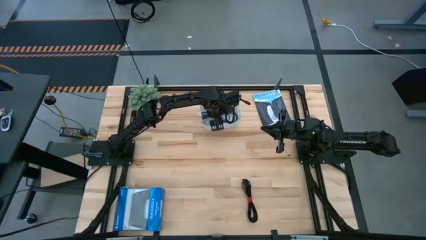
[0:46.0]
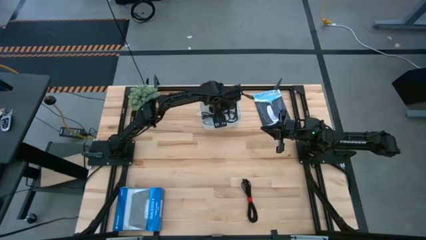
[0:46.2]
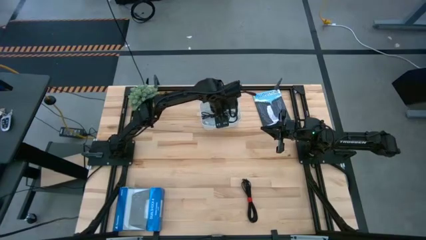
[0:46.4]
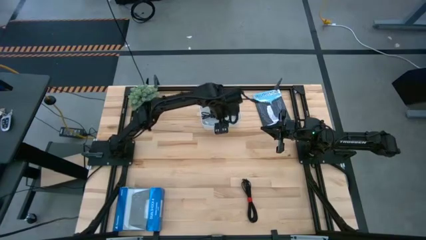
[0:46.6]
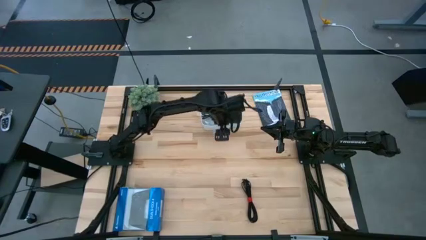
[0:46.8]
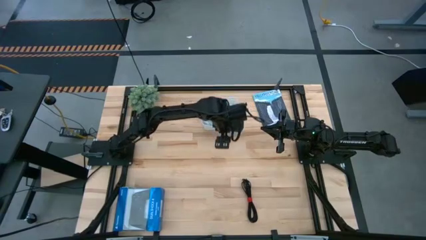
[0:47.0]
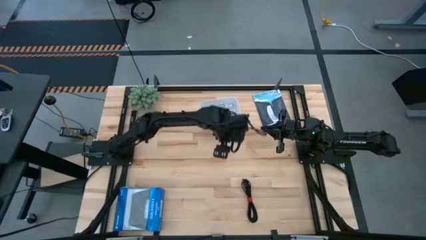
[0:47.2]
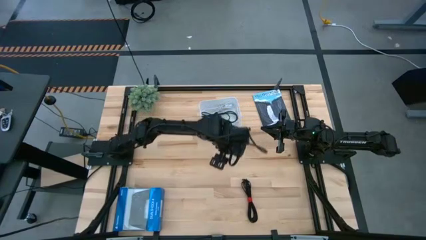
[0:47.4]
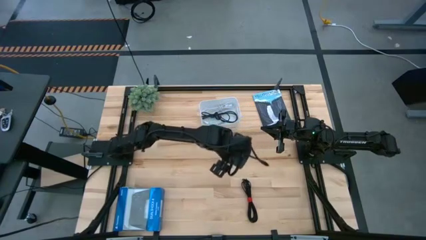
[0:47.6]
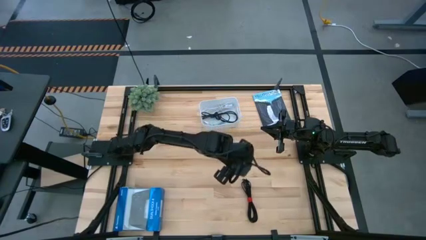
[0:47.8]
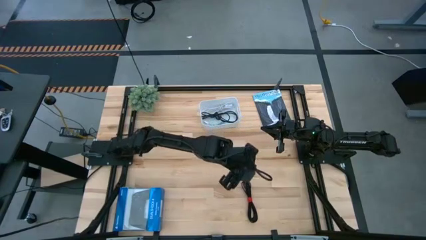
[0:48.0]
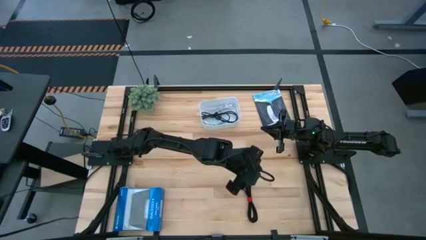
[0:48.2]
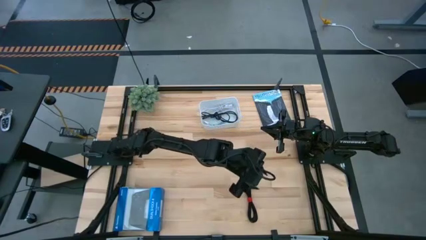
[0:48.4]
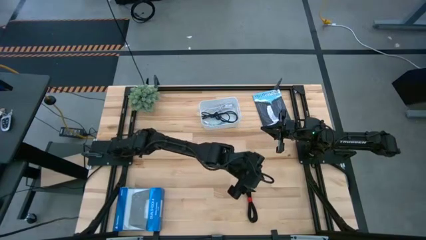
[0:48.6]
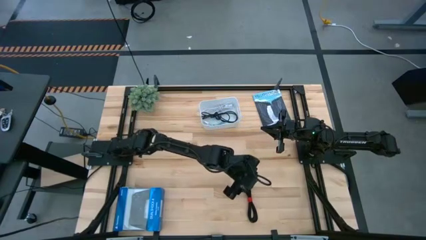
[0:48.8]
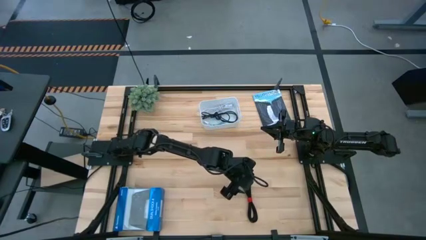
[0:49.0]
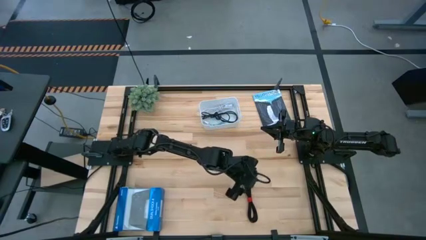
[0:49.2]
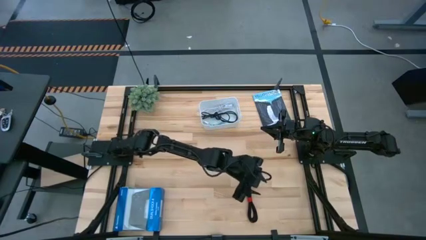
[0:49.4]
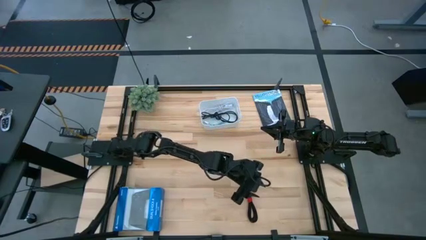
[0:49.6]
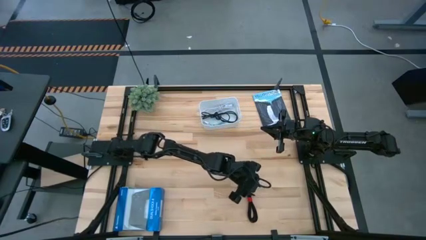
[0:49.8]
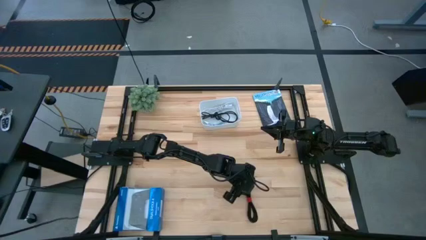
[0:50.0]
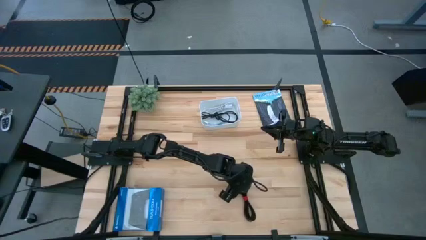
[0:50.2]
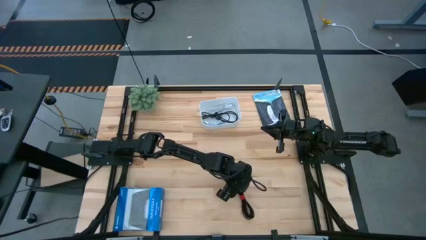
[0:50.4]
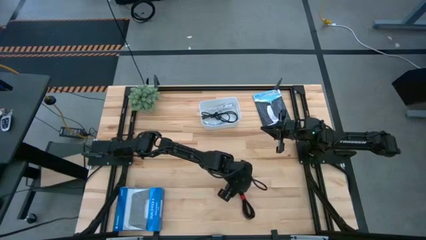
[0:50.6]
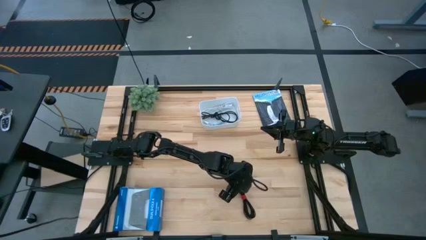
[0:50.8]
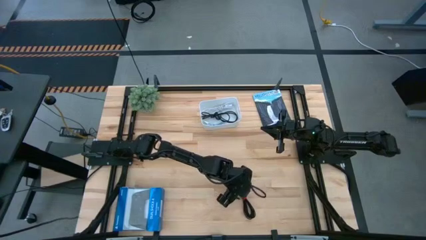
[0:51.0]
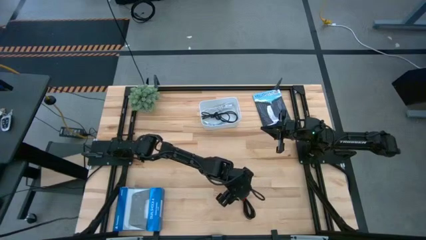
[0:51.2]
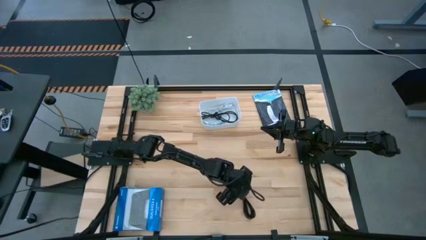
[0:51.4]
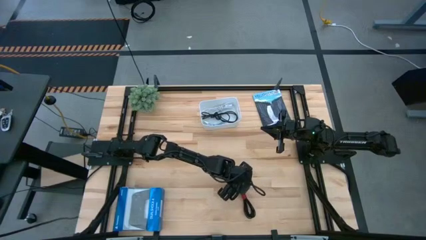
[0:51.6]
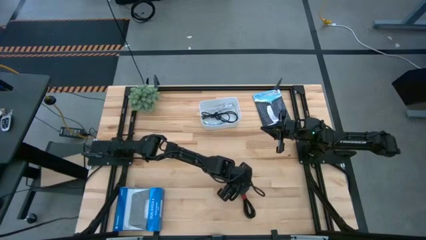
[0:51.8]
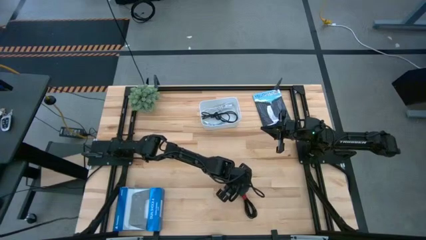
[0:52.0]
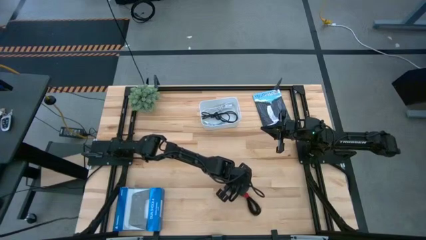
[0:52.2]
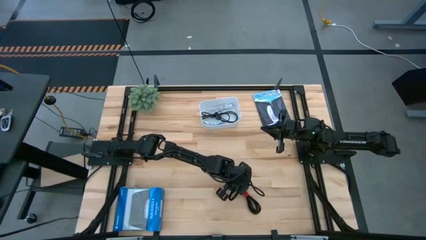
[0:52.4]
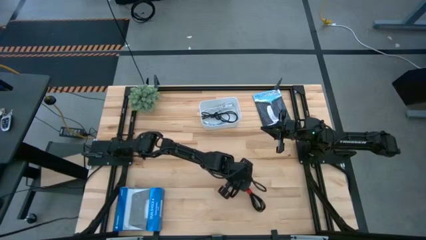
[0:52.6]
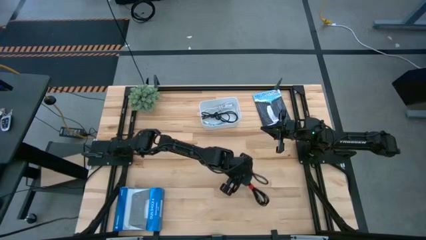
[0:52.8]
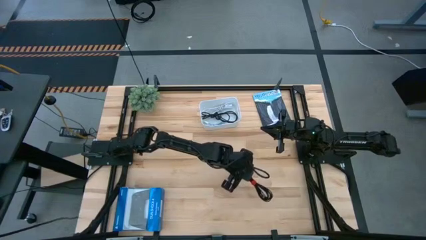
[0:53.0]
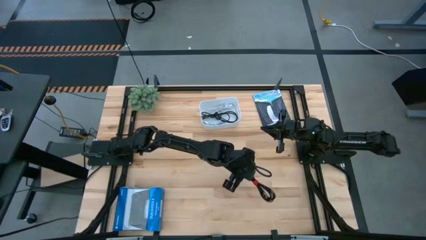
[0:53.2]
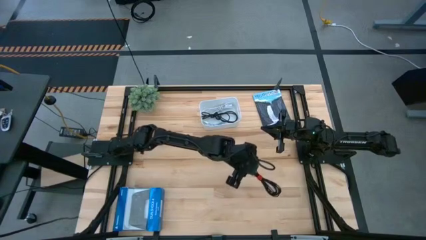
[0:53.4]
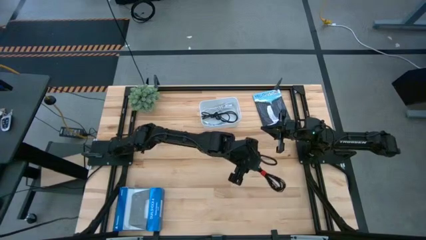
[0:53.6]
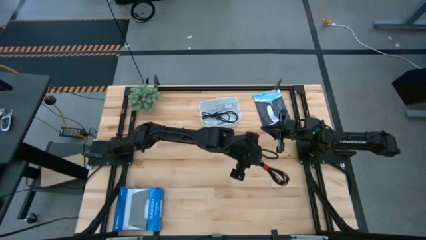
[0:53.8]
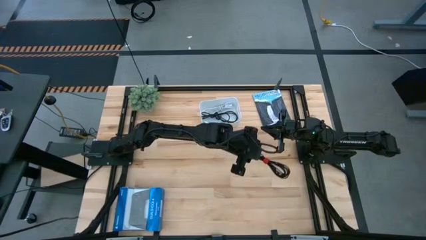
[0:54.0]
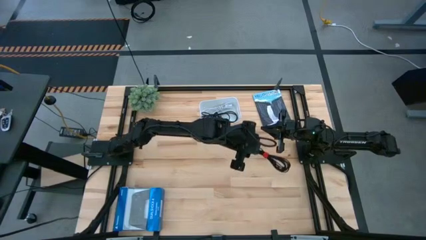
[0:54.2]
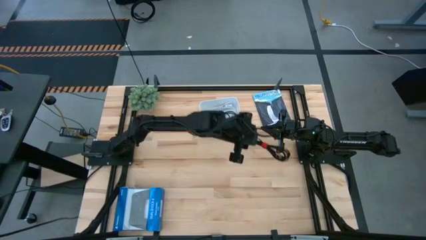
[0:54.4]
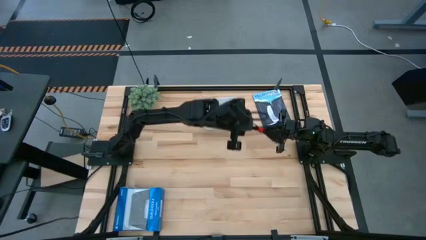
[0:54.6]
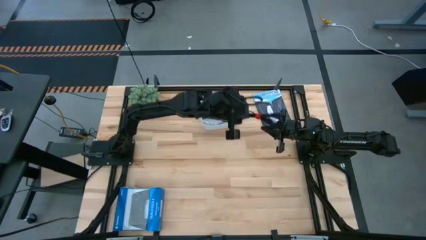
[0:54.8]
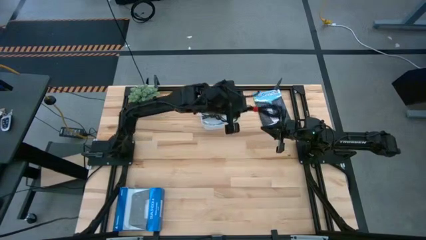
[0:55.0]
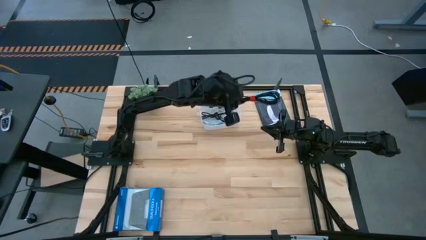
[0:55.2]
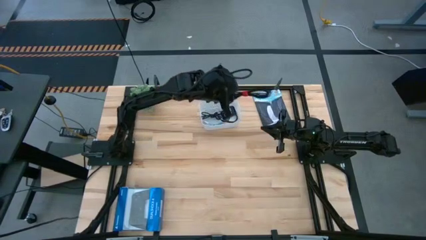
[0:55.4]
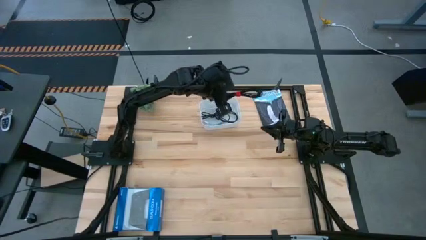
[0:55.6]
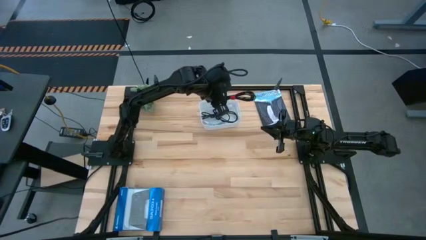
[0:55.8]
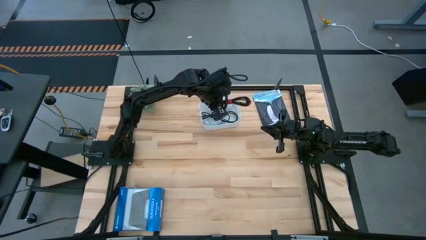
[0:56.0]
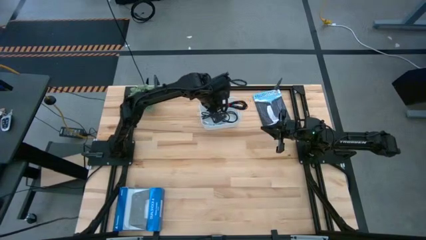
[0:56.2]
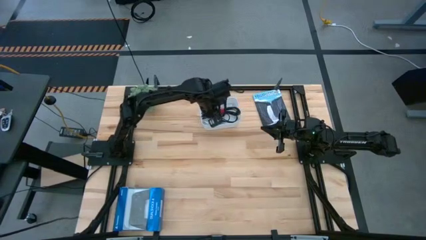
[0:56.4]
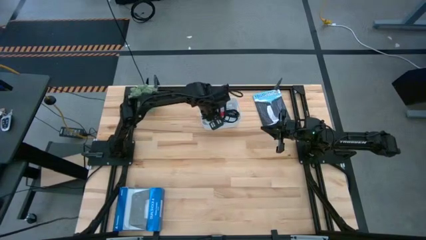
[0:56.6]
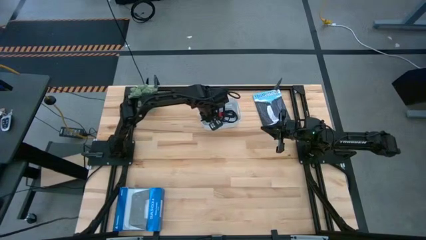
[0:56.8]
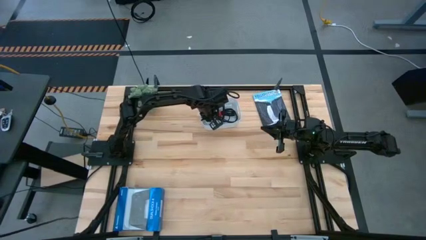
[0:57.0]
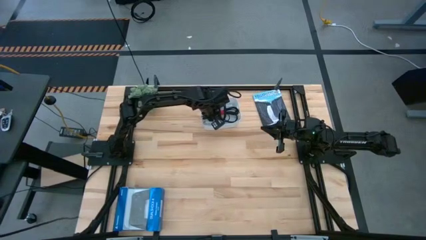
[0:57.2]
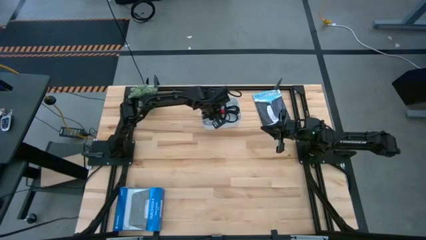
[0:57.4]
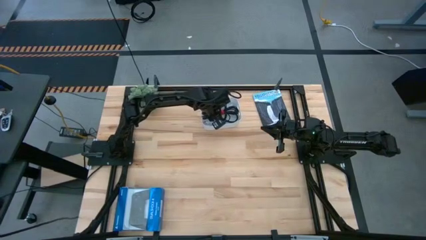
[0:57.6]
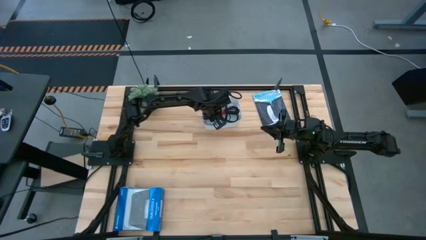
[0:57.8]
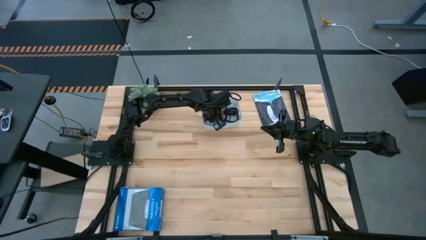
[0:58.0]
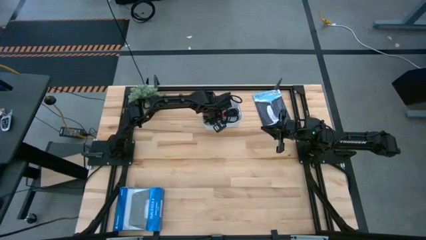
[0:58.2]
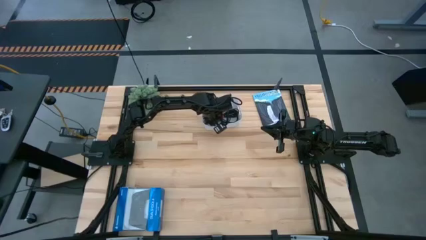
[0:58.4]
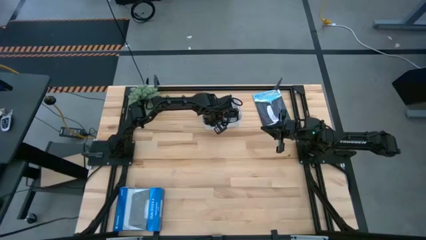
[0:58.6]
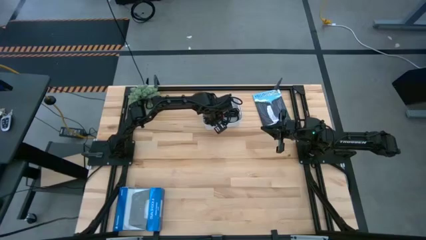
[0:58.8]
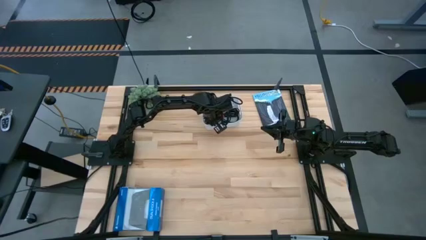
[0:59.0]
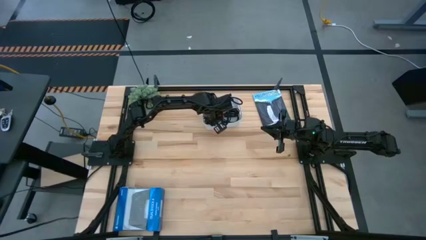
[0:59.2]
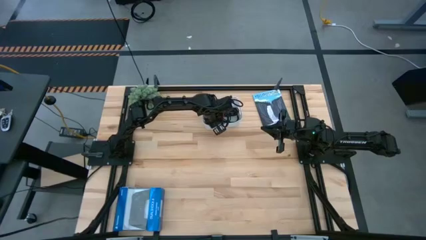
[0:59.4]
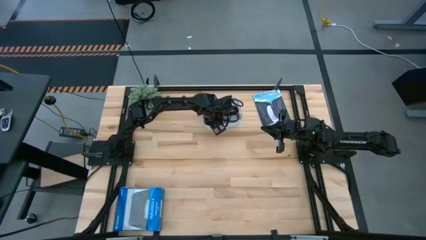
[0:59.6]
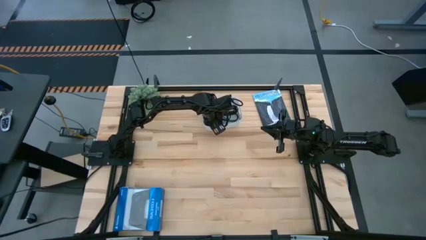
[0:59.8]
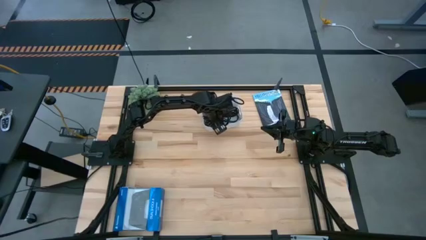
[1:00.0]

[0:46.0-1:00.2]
Task: Pick and place USB-C Cables
Put the black charger cable into the white bin
